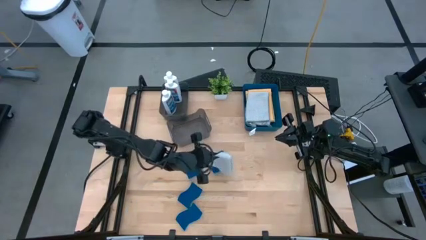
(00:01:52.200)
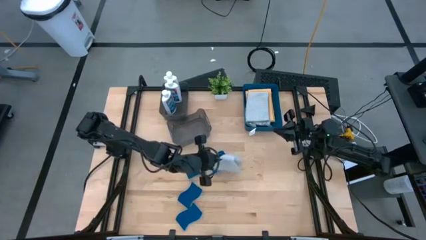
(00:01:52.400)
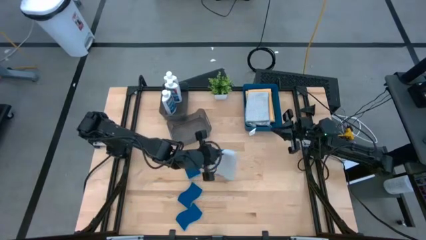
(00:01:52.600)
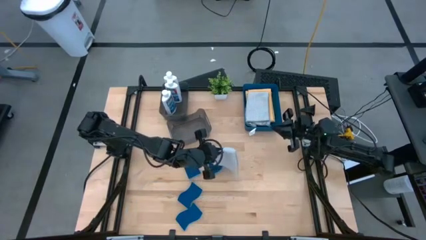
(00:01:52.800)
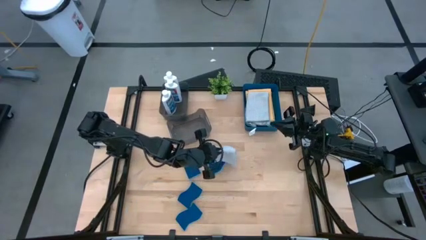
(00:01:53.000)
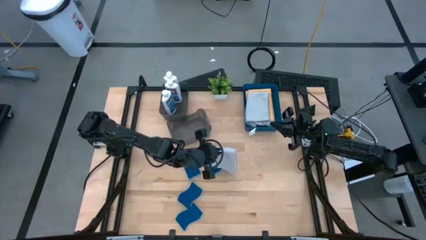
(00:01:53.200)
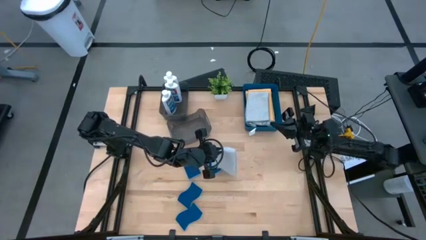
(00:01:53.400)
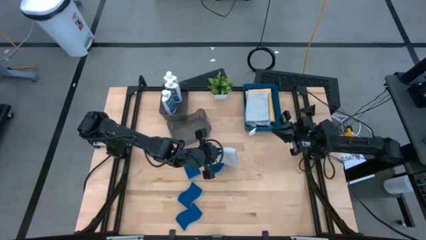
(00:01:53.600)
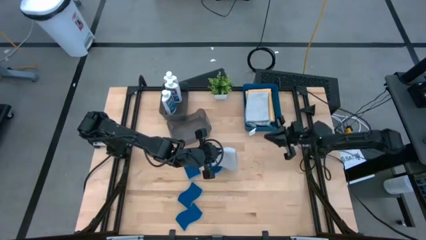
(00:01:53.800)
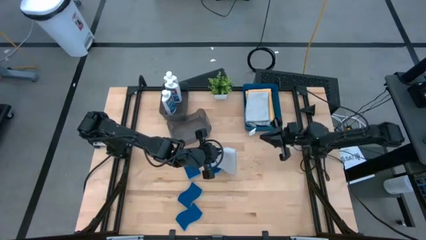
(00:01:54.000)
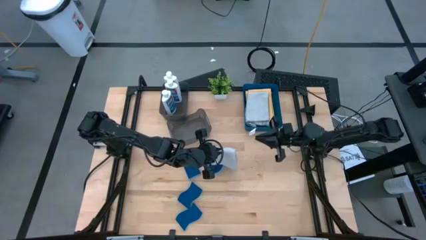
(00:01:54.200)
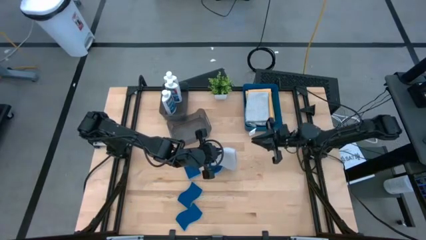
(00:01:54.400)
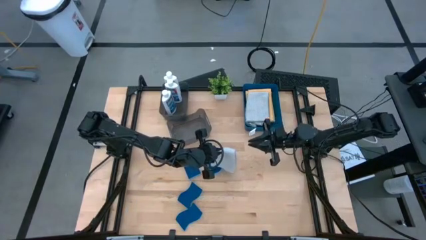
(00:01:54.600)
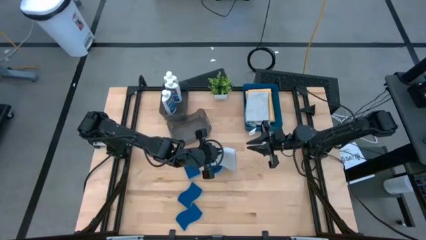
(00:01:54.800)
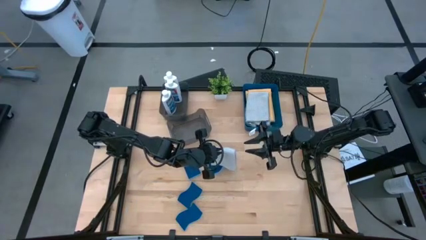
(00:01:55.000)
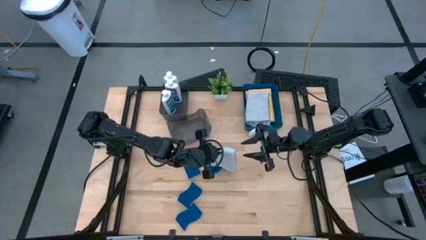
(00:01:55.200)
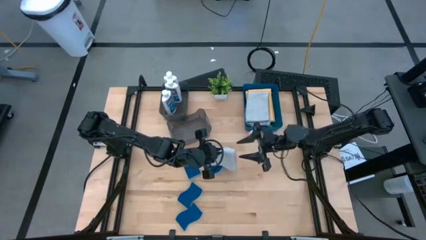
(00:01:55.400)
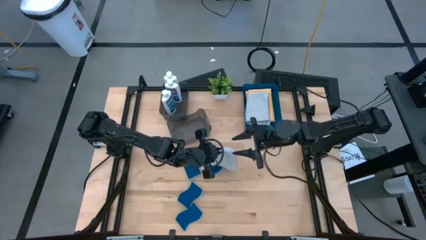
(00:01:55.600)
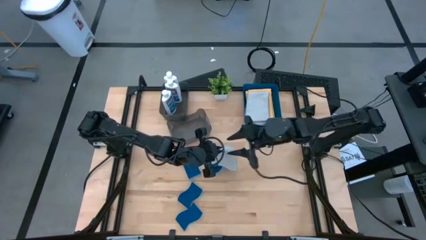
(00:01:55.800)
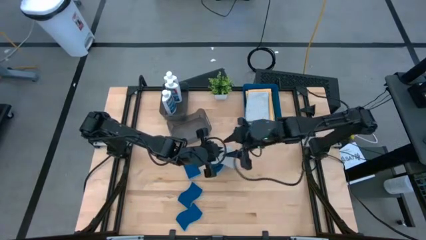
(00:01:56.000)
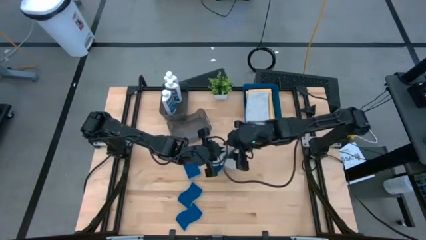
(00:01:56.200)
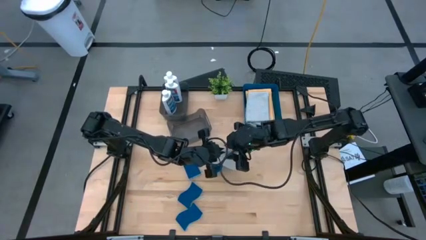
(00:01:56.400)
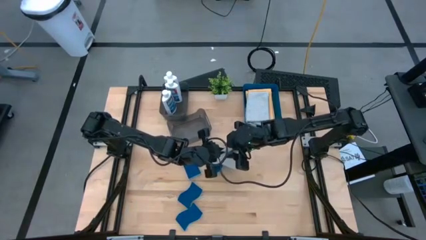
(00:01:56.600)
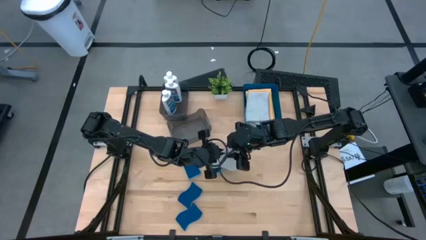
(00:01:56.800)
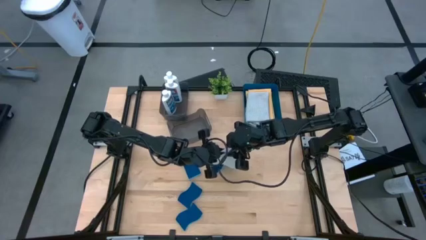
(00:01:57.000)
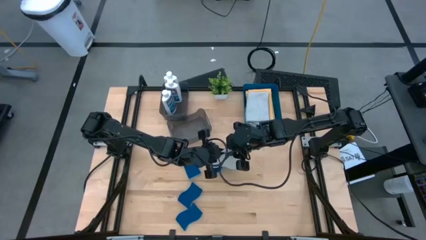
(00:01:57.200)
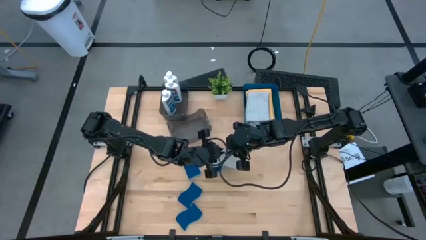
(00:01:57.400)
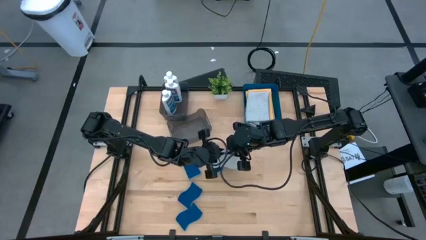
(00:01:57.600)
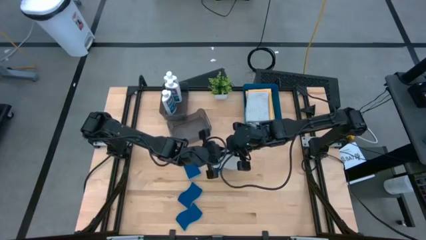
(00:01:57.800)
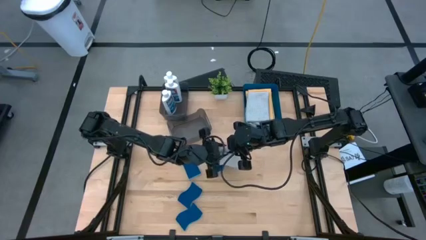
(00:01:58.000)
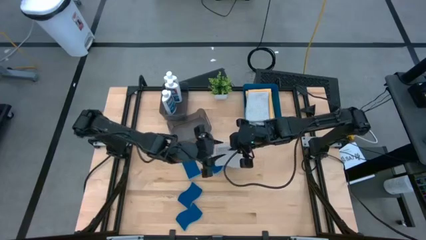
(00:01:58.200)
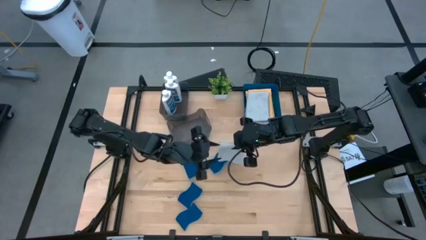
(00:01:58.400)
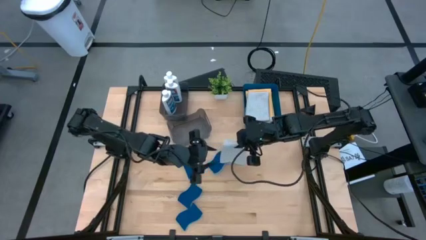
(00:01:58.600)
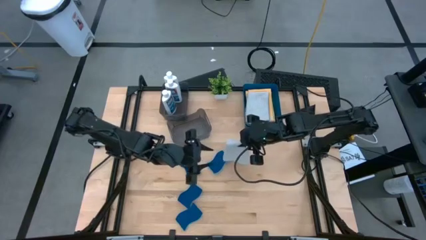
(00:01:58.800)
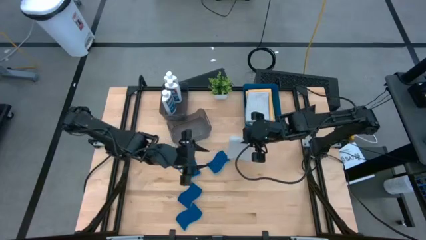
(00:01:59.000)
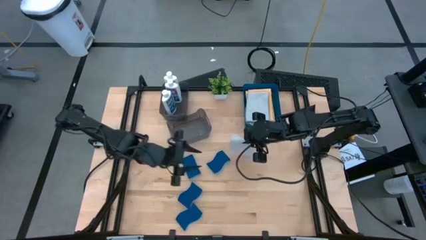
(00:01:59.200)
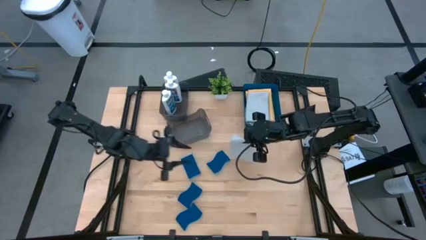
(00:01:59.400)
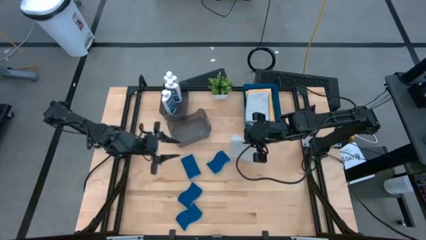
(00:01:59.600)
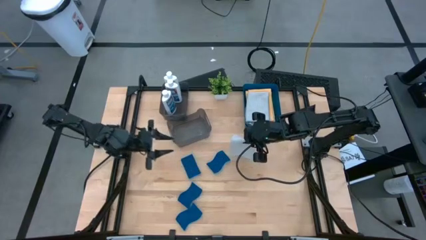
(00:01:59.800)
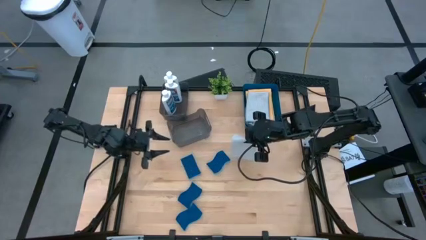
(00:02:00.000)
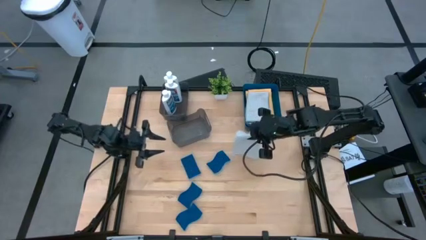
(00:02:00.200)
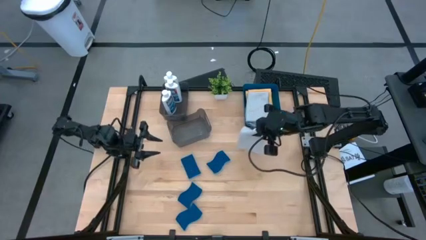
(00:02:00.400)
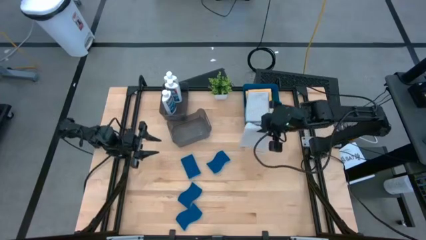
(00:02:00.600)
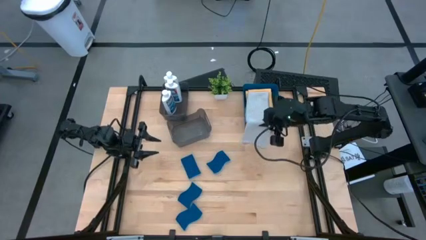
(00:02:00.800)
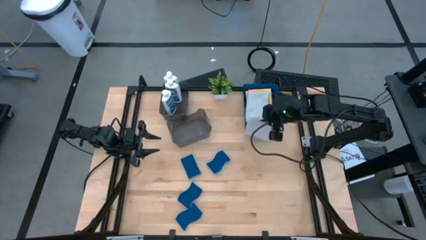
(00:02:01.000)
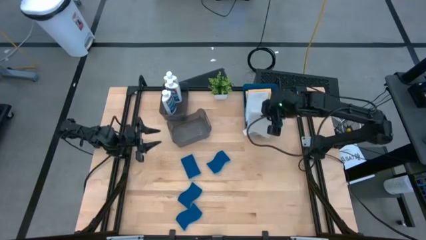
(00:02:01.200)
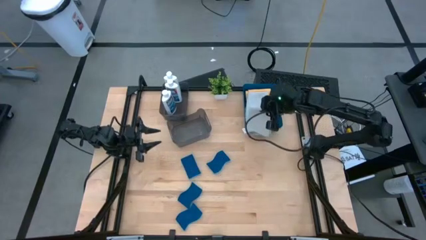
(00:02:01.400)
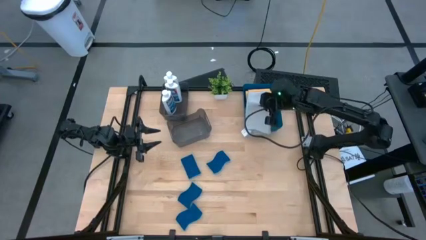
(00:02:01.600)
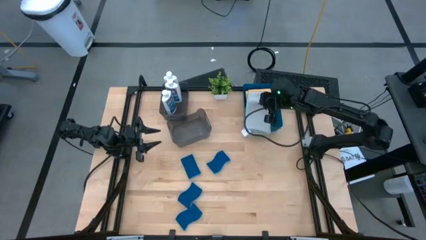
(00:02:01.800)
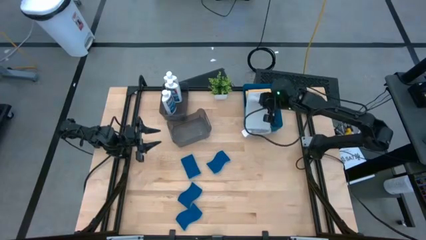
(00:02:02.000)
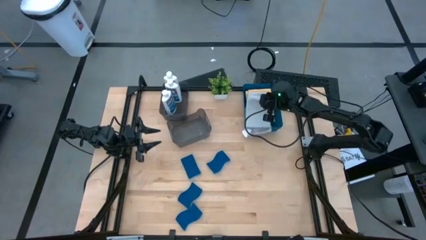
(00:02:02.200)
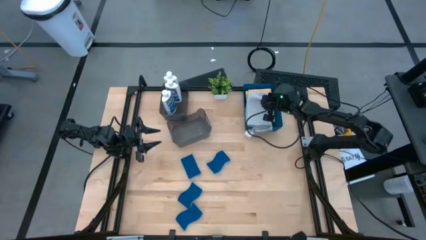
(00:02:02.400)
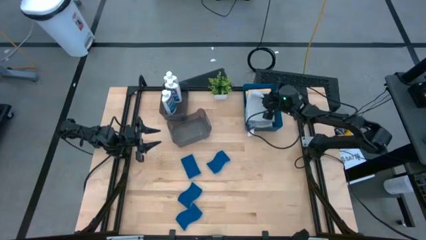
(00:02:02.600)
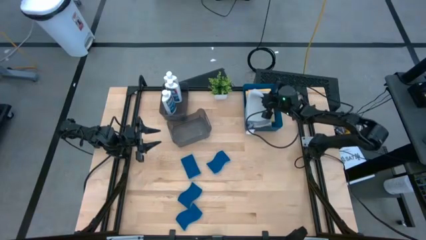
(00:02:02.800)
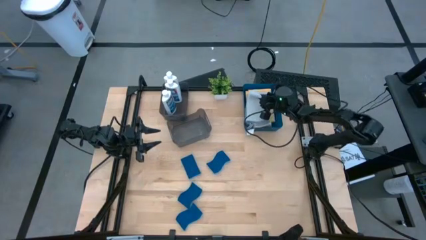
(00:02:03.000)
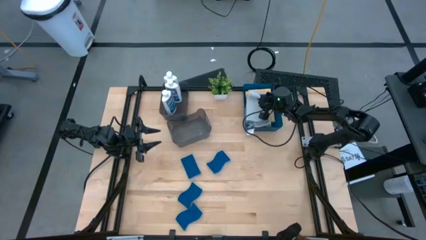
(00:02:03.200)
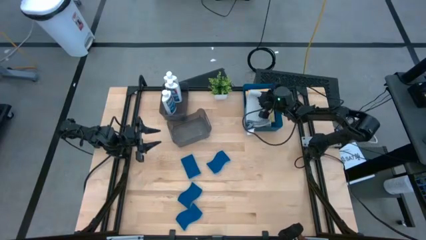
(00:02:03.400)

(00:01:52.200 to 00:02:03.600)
Task: Pick & Place Kitchen Items
Put the gray towel into the blue bin

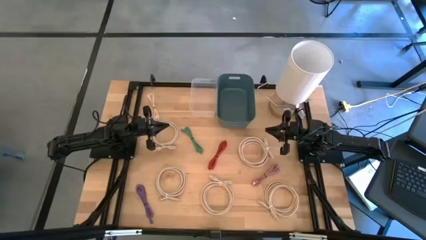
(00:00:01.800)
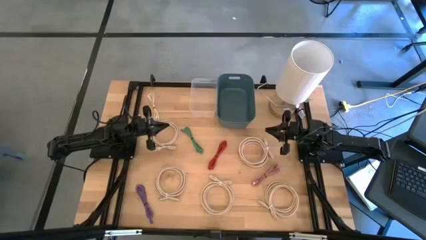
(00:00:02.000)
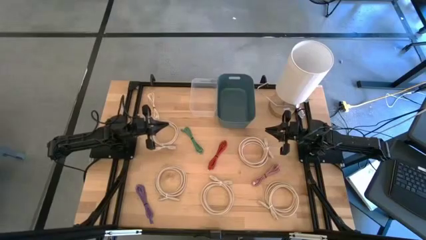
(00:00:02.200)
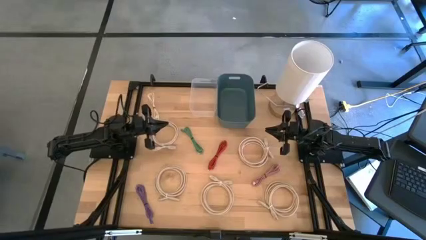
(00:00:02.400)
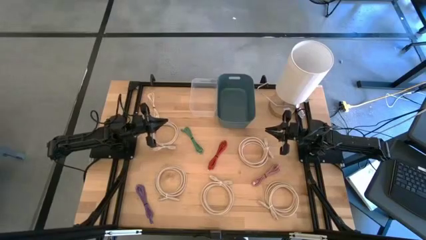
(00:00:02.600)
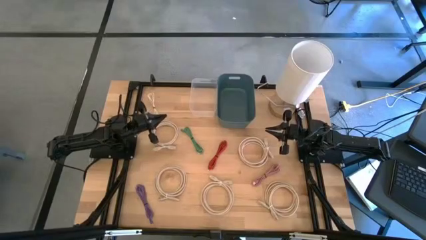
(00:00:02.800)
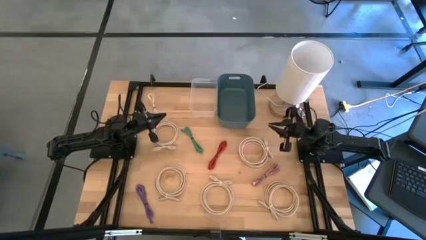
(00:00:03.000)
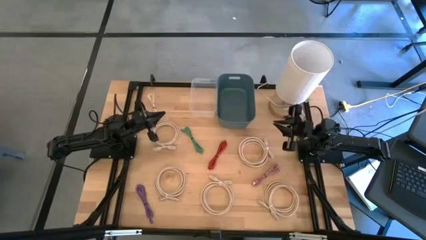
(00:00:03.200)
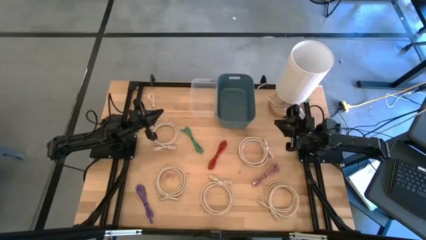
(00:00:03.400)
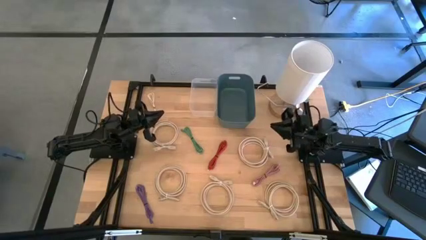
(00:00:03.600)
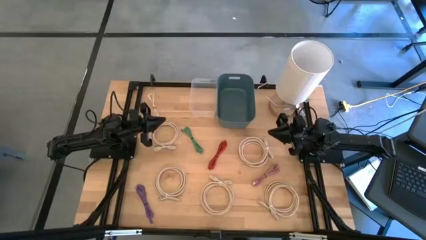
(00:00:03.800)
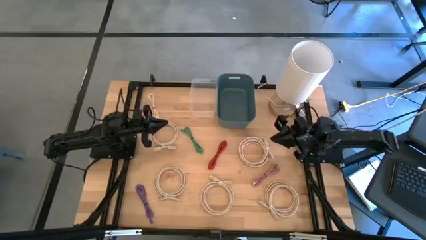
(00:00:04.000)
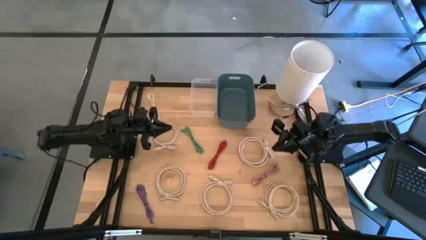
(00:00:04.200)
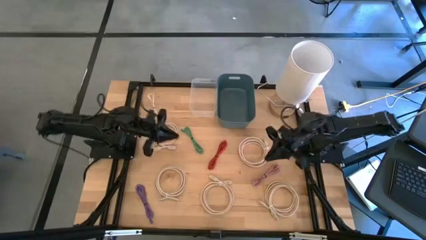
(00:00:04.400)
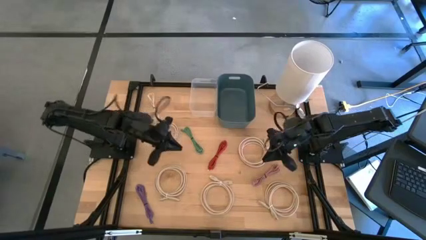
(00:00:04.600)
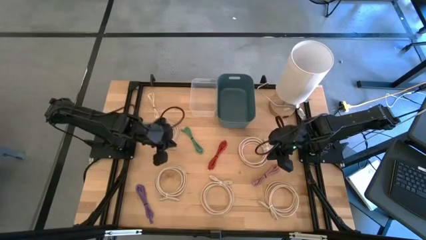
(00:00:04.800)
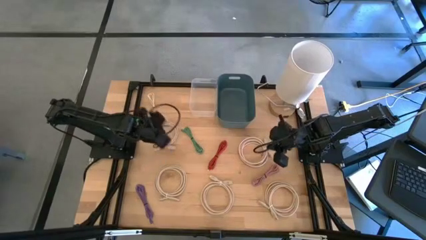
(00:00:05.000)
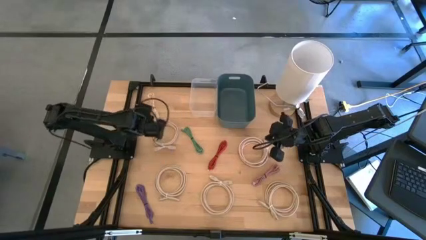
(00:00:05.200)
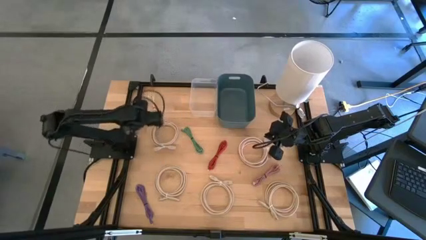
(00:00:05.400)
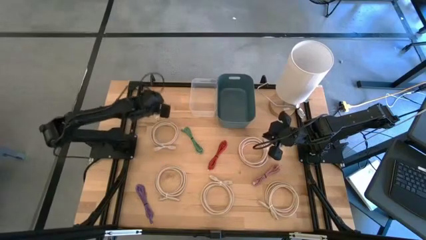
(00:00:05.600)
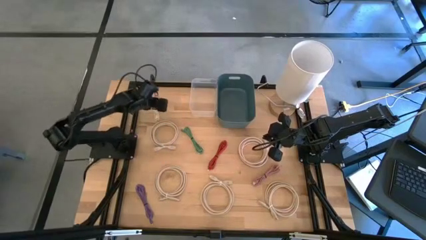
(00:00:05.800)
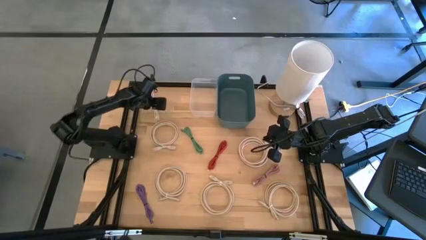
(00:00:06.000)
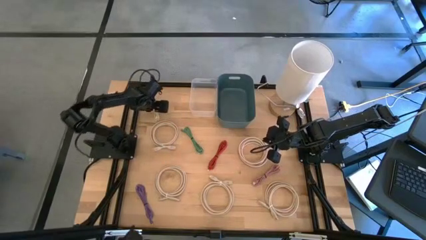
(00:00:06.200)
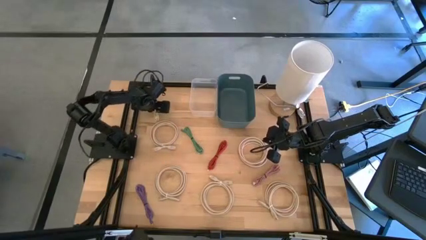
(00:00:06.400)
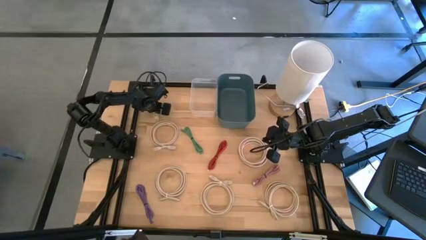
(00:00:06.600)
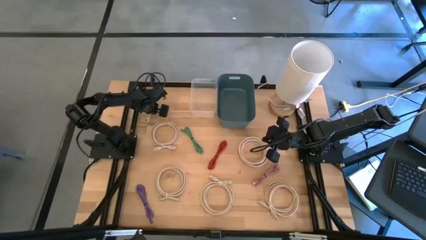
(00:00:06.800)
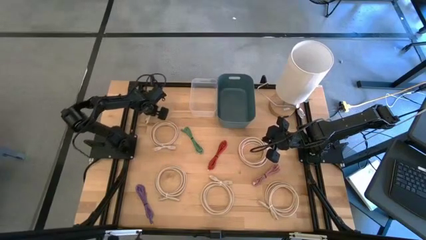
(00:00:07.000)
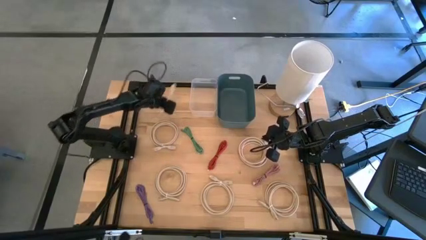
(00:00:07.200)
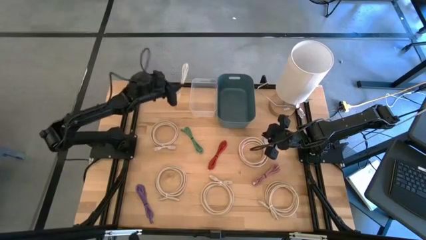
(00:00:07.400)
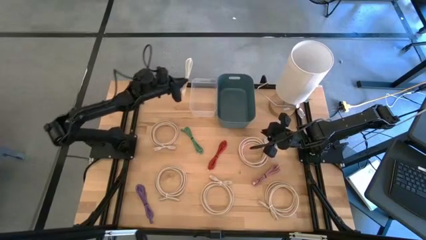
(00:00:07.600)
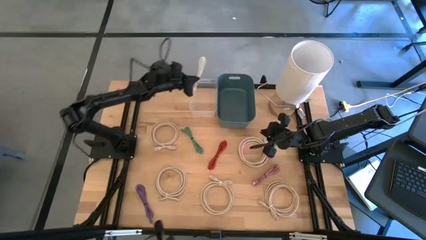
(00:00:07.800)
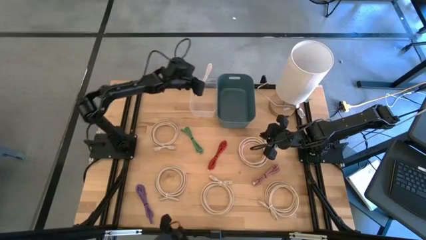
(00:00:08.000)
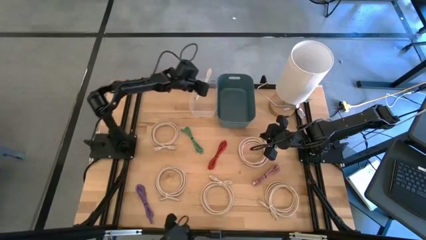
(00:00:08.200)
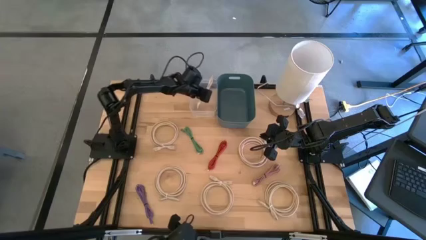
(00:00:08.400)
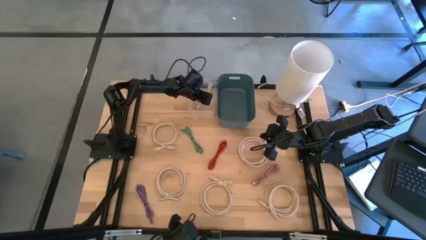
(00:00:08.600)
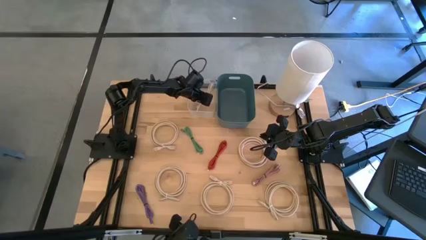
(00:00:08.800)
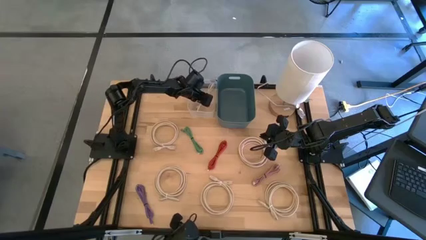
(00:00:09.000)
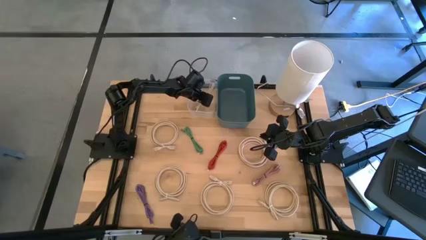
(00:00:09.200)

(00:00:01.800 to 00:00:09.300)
Task: Pick and place USB-C Cables
Put the white USB cable into the transparent bin
